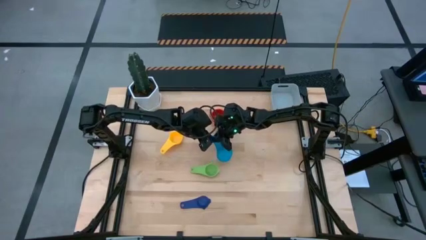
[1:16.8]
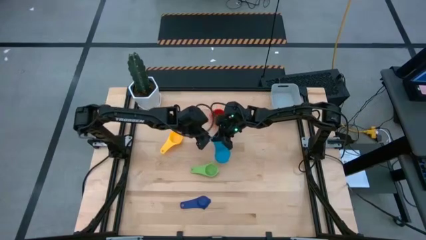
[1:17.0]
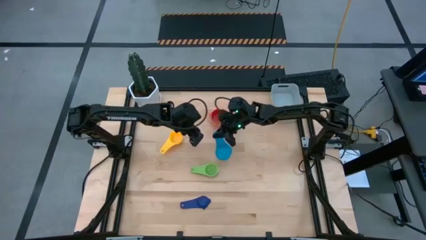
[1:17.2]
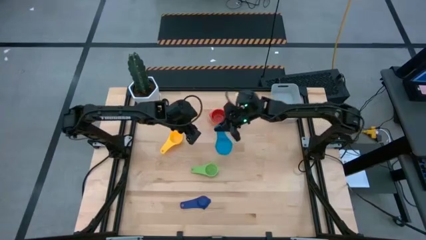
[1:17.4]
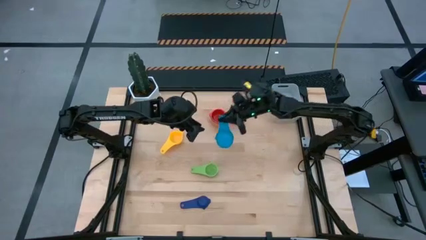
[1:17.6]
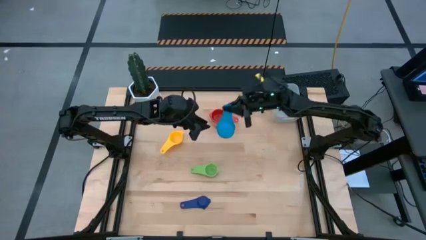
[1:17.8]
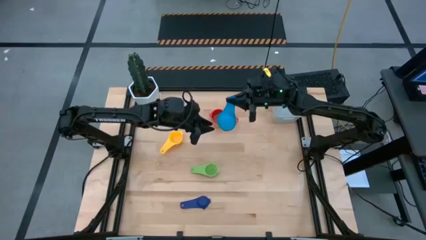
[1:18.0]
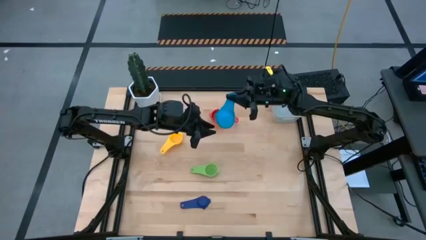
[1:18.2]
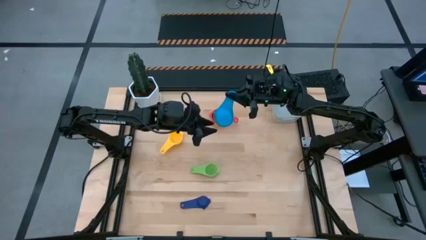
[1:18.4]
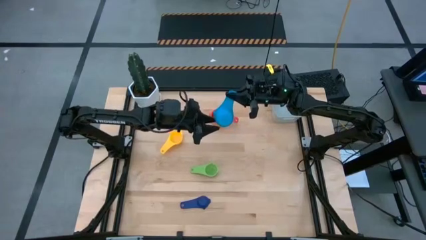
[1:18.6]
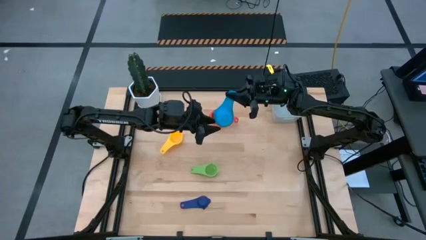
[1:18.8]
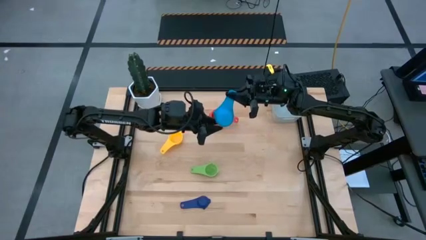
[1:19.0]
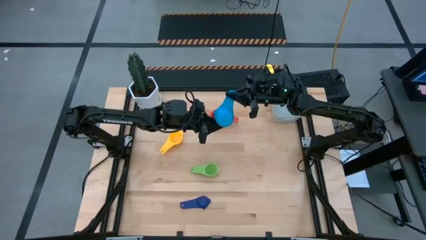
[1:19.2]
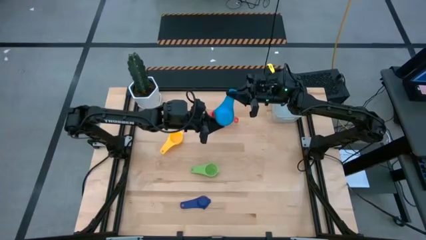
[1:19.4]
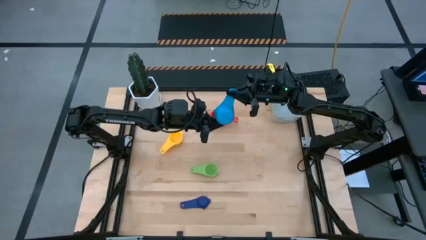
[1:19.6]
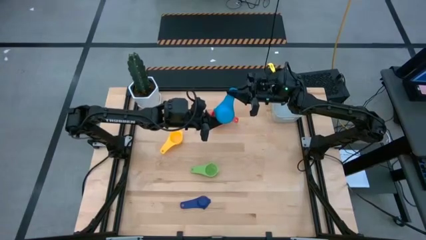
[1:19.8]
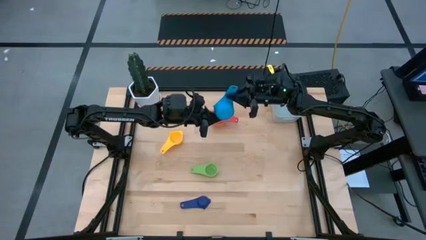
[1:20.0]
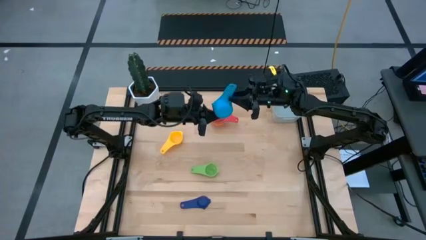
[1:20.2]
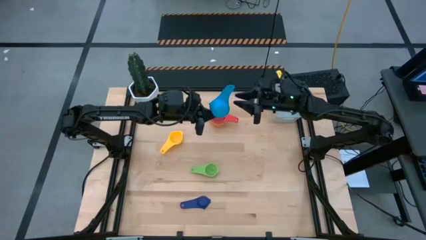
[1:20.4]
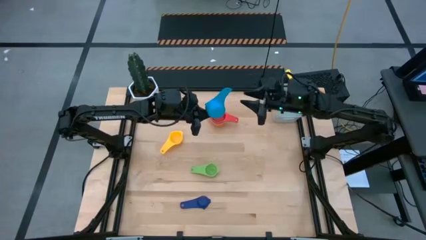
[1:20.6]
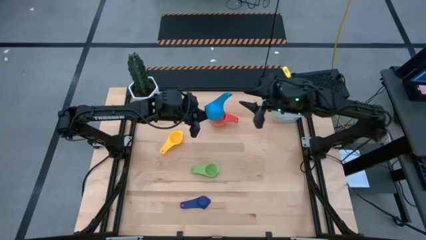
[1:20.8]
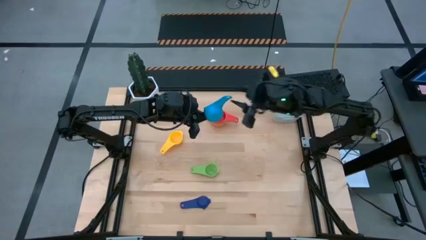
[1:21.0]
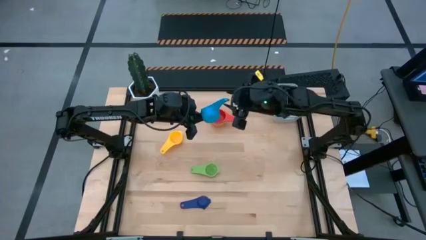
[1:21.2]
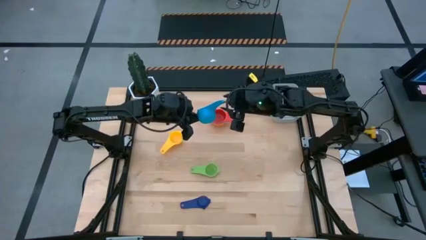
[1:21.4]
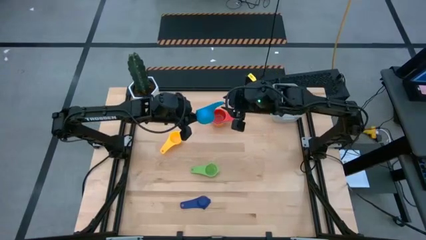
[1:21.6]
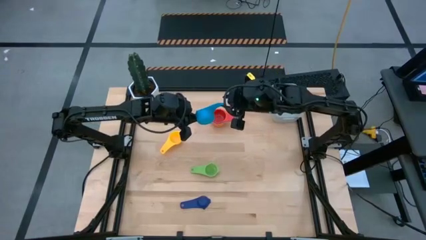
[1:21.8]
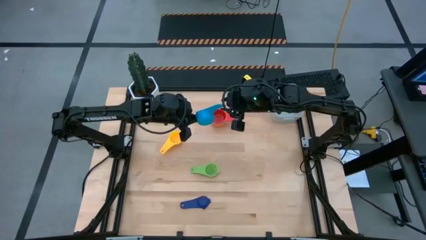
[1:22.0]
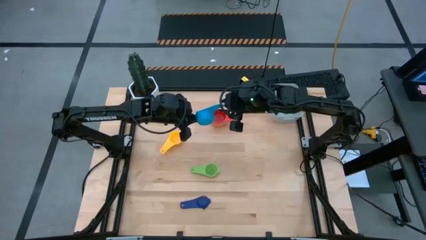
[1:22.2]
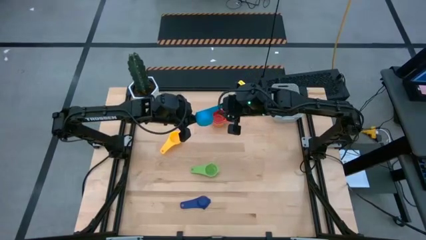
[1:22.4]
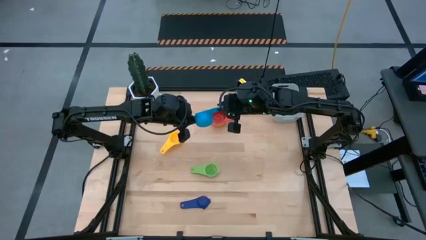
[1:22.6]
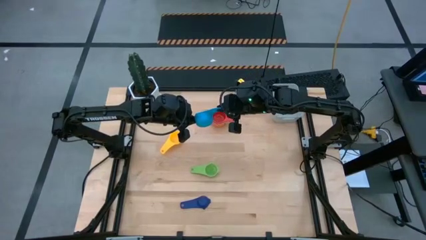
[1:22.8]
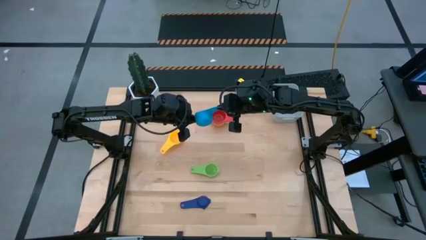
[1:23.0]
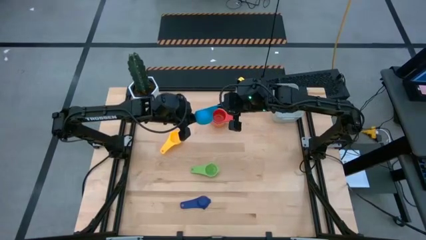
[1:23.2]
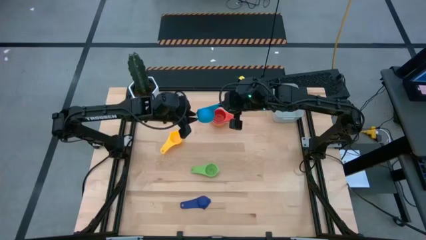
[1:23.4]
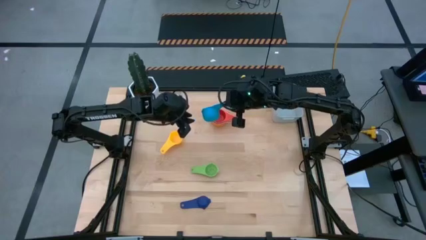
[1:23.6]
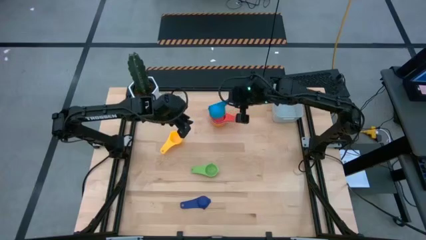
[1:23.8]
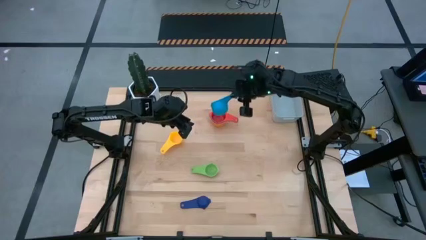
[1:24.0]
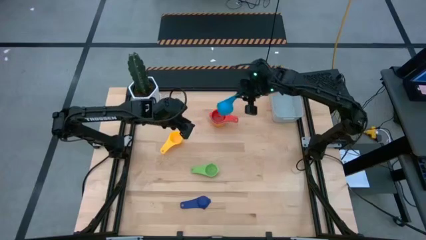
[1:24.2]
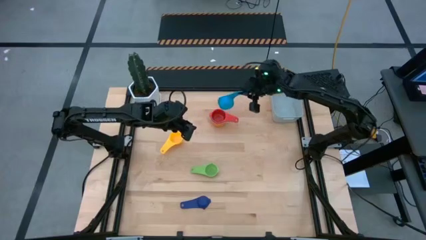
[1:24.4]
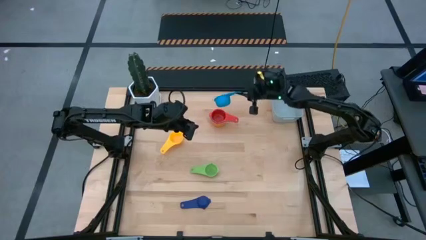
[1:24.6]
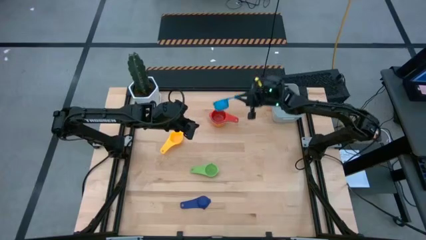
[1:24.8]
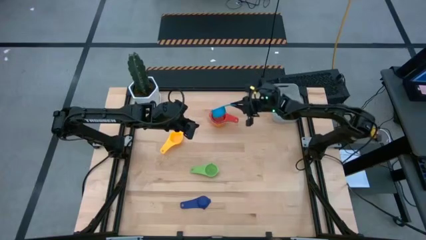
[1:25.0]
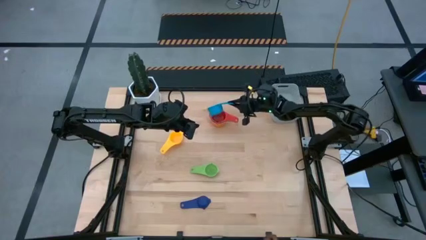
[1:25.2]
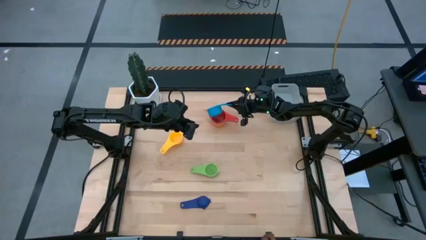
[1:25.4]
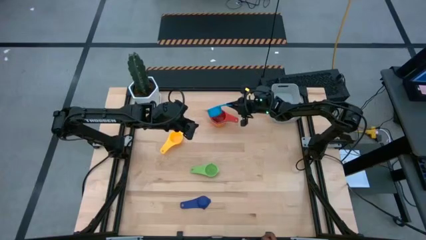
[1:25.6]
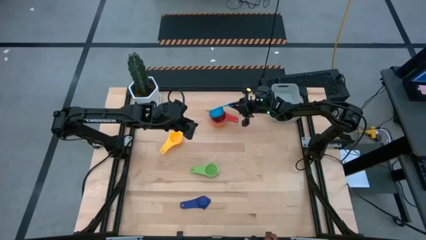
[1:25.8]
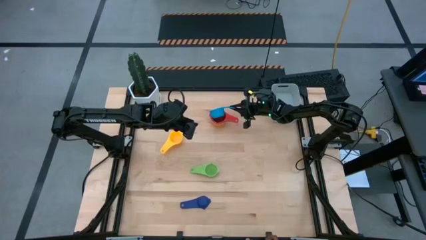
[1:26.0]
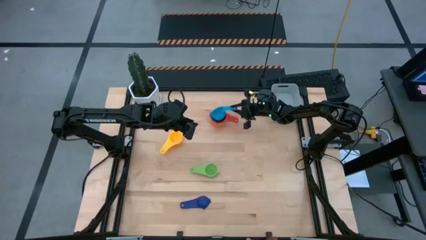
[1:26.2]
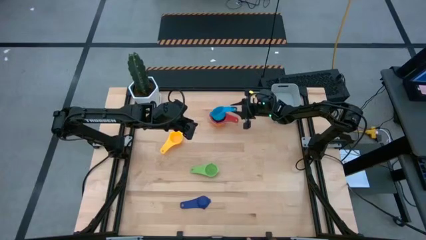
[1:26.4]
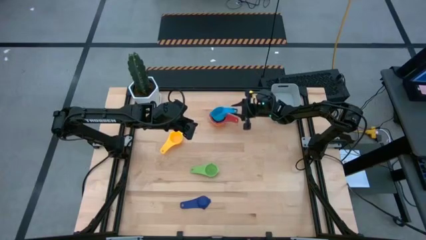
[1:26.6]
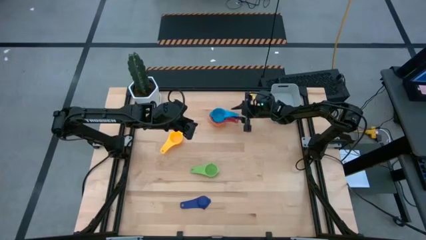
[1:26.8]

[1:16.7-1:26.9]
Task: Nest measuring cups in basket
Stack the light blue measuring cup on top of the red measuring cup

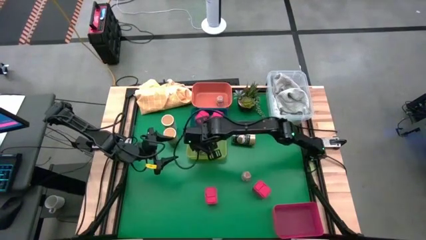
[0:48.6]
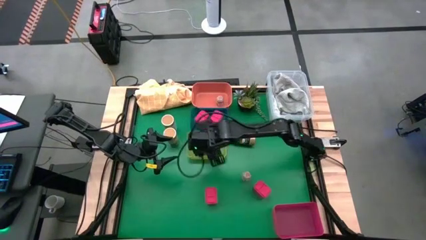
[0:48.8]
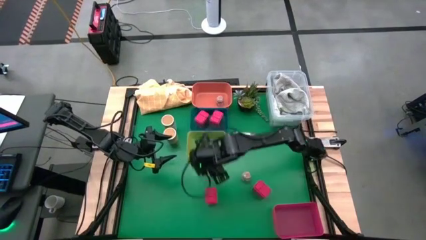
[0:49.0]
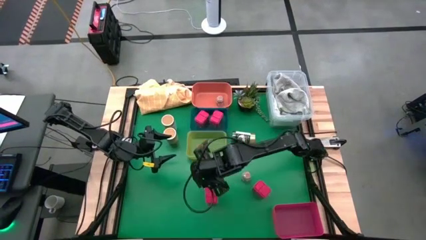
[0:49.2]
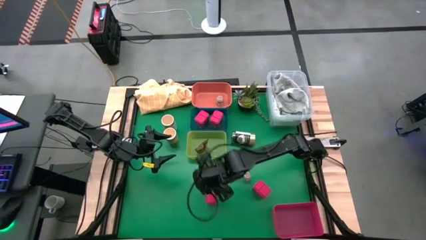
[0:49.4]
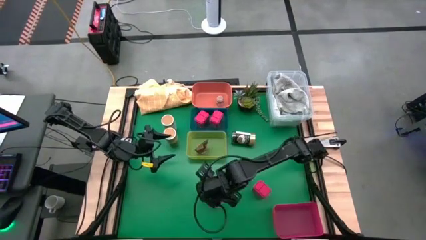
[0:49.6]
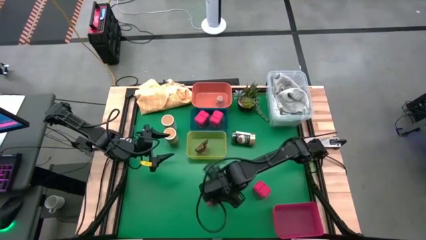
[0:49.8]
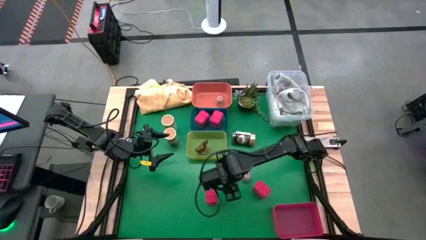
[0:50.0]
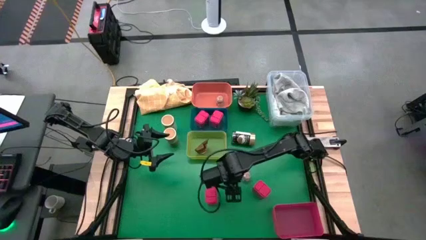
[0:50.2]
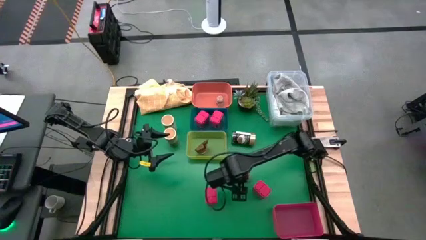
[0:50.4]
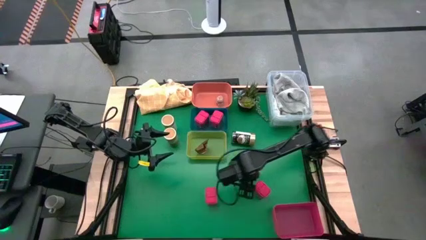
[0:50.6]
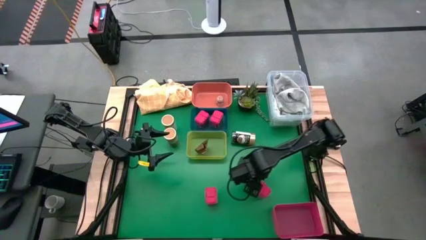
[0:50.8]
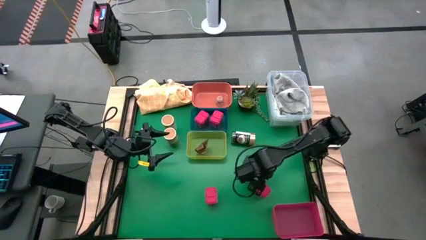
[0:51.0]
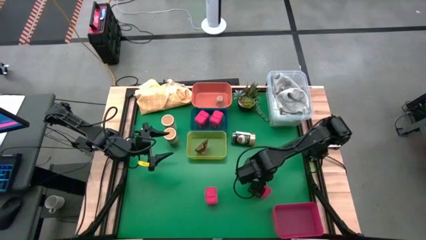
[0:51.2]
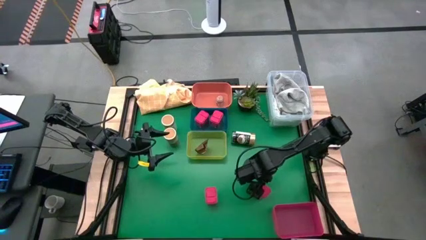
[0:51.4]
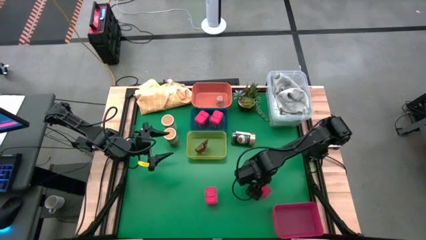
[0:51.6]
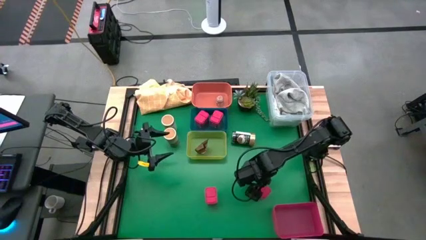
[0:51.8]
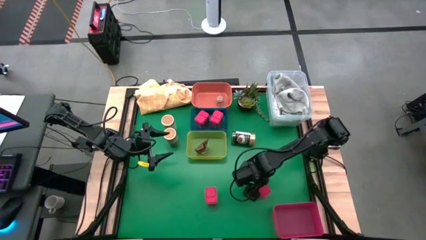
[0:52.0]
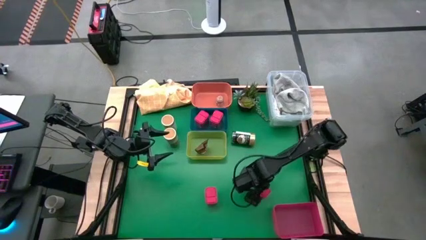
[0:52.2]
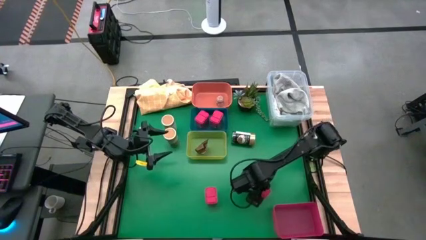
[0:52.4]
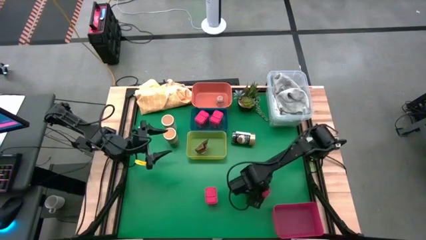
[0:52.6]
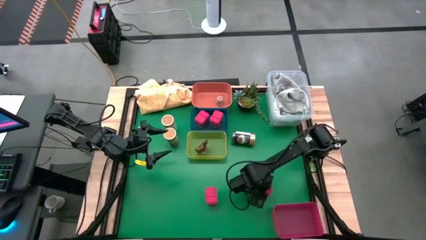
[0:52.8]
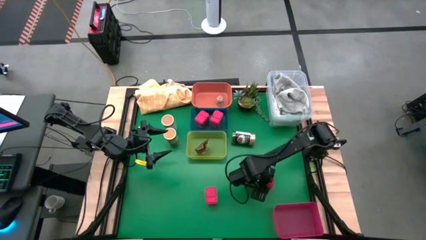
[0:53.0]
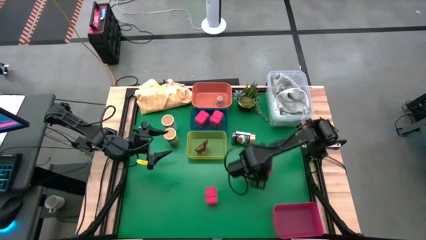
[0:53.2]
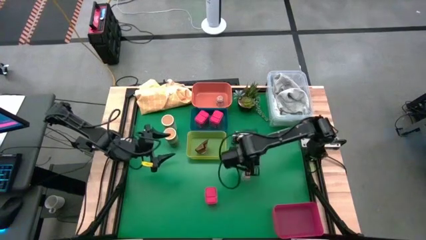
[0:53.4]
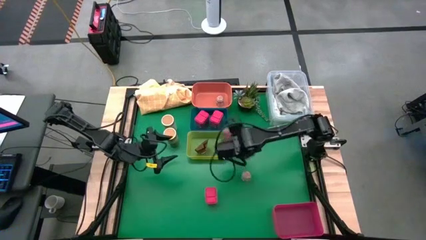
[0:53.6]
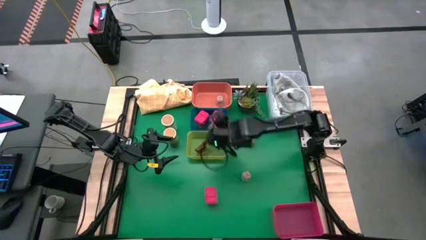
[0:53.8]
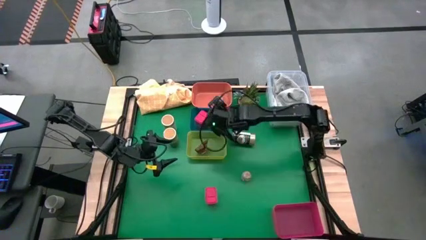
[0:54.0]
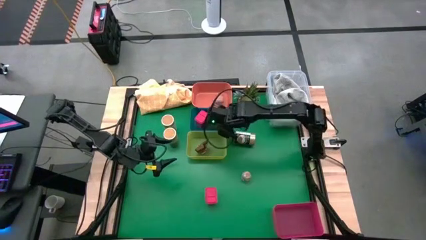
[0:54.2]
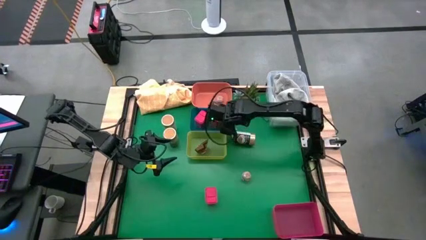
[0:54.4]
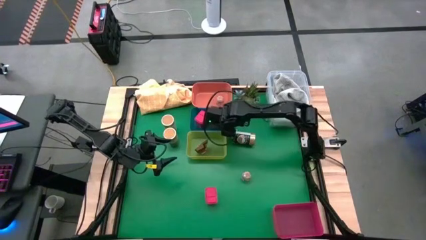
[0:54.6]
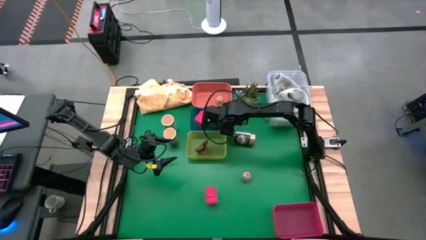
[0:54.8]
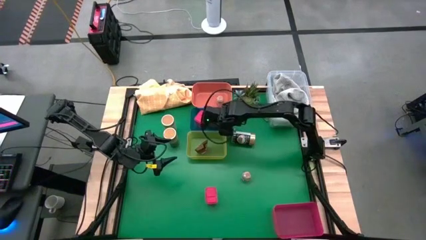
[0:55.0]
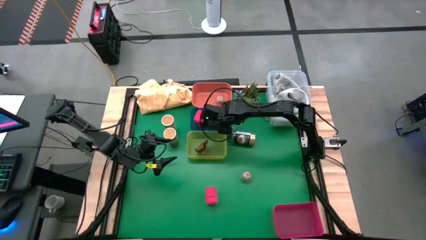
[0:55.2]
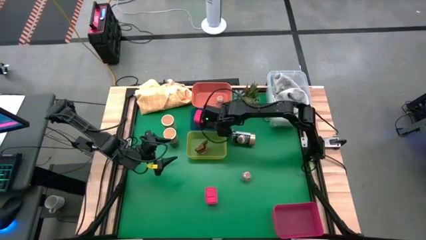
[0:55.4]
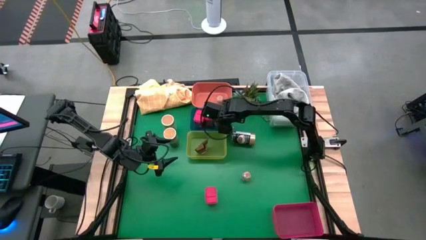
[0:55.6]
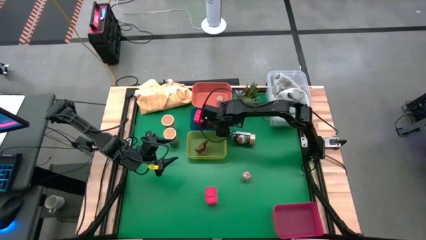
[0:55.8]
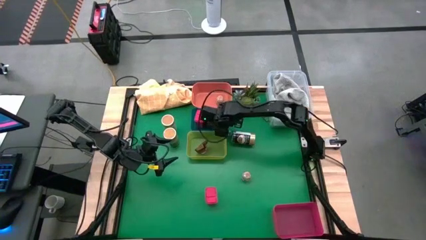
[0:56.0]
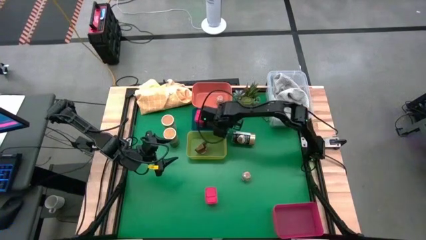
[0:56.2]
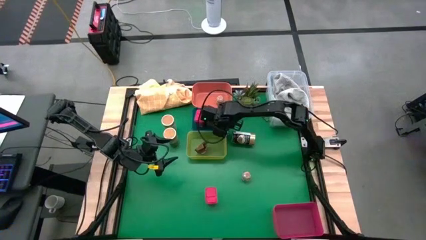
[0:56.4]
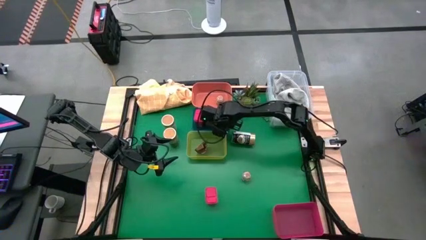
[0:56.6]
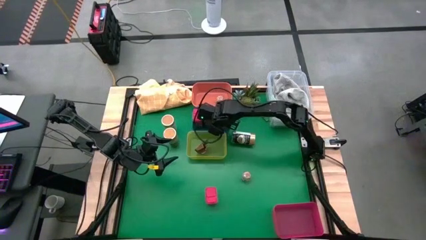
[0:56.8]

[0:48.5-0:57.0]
Task: Sort spices by type
Put the red seasoning can into the blue bin
